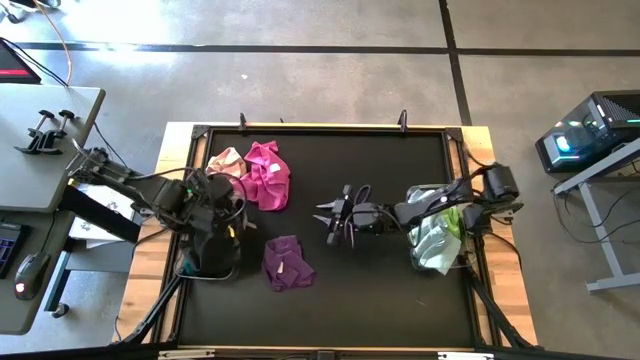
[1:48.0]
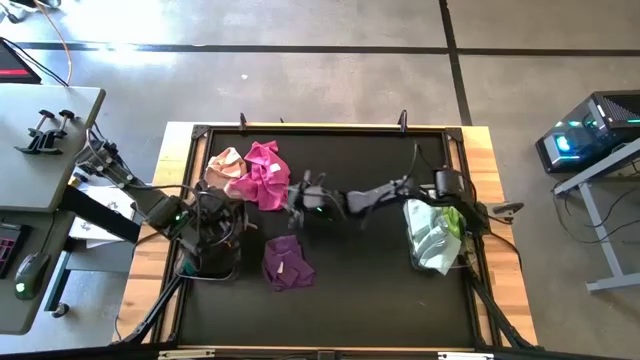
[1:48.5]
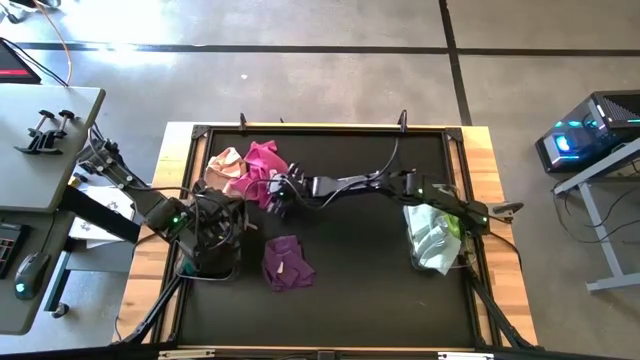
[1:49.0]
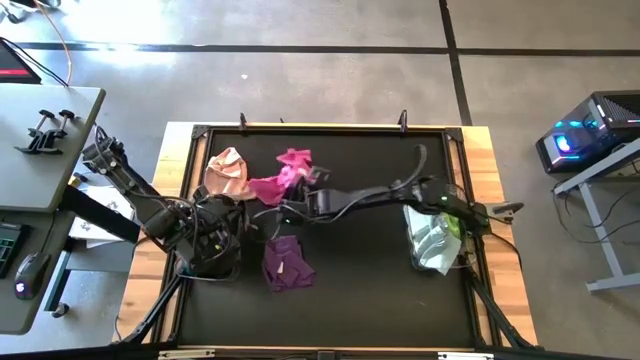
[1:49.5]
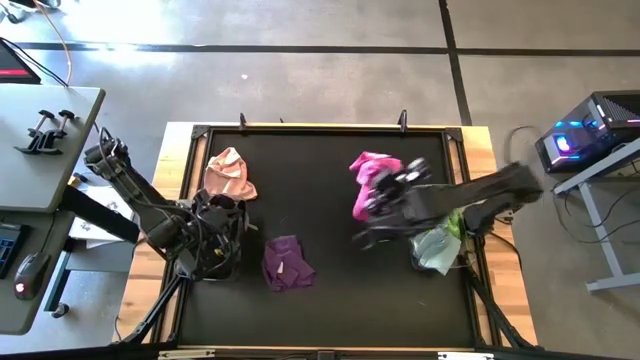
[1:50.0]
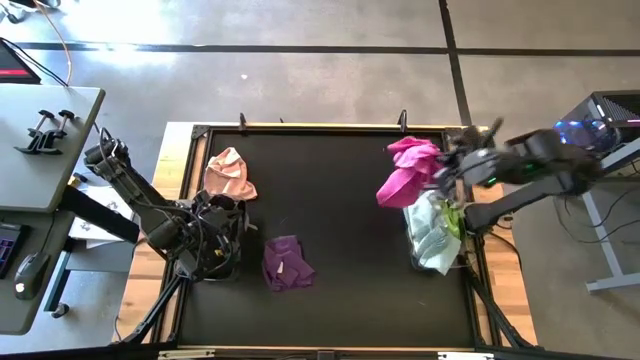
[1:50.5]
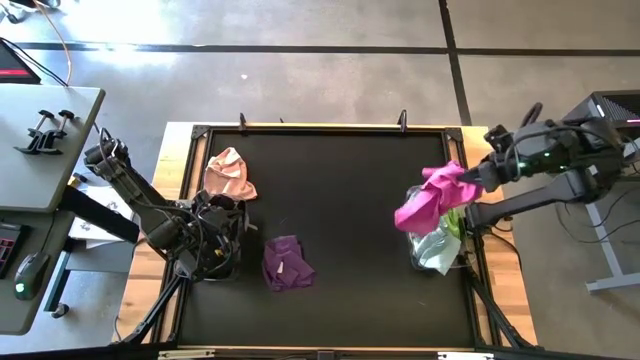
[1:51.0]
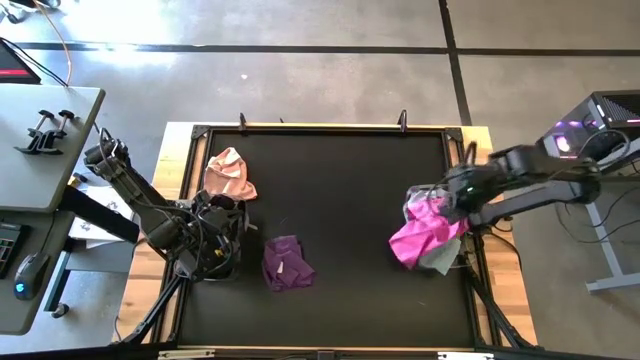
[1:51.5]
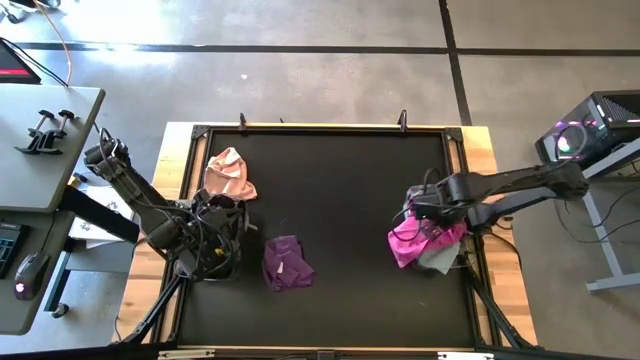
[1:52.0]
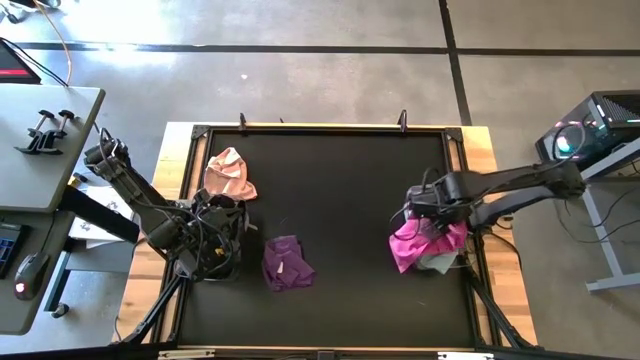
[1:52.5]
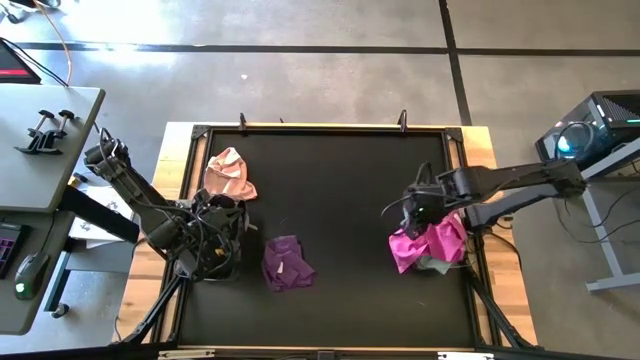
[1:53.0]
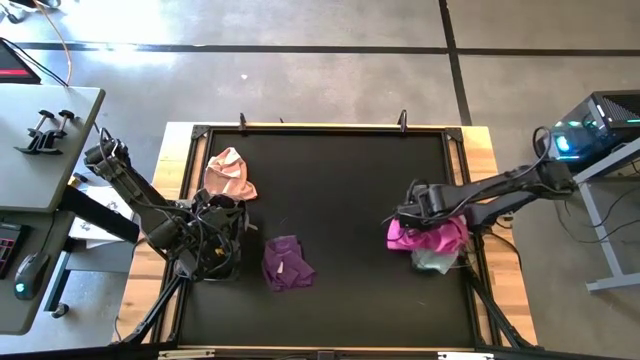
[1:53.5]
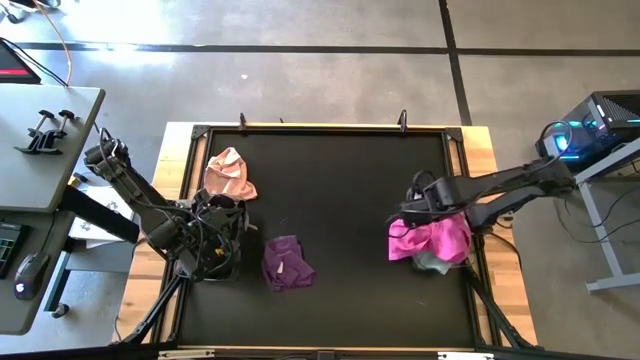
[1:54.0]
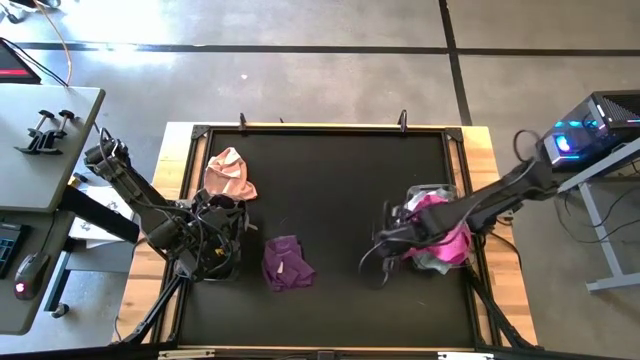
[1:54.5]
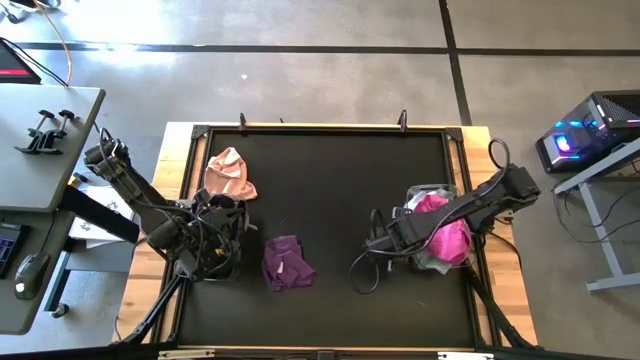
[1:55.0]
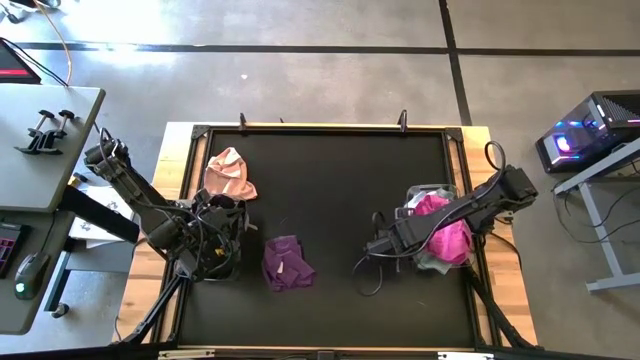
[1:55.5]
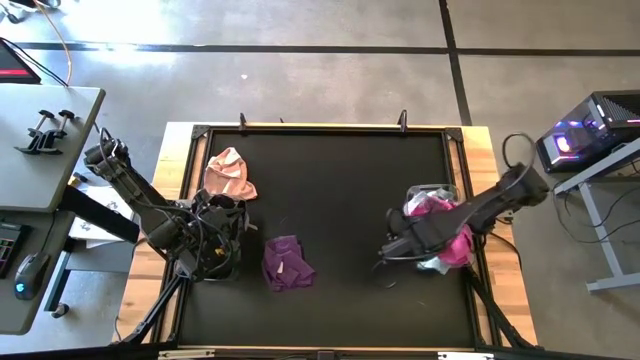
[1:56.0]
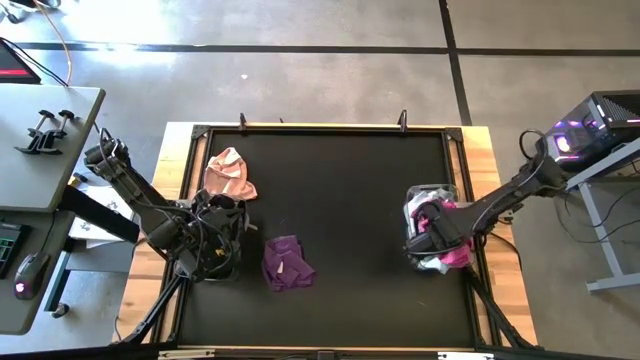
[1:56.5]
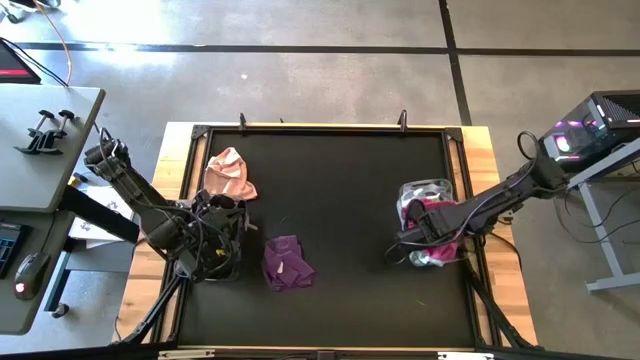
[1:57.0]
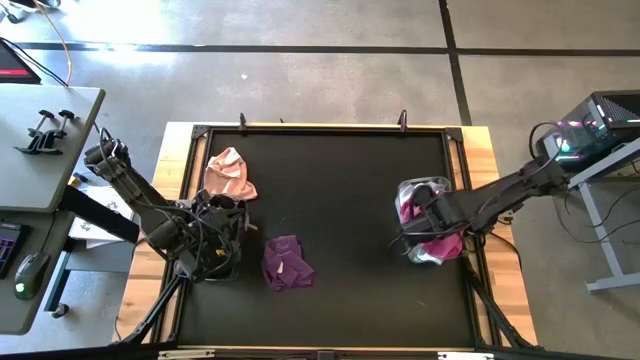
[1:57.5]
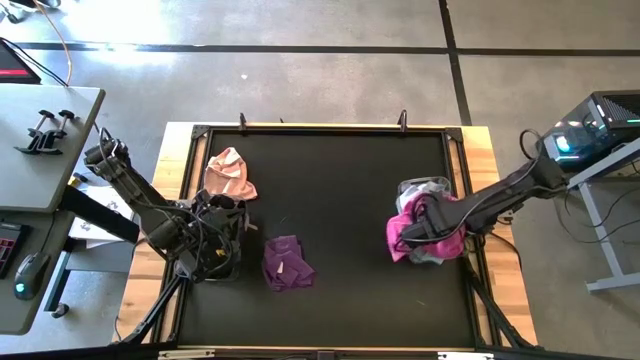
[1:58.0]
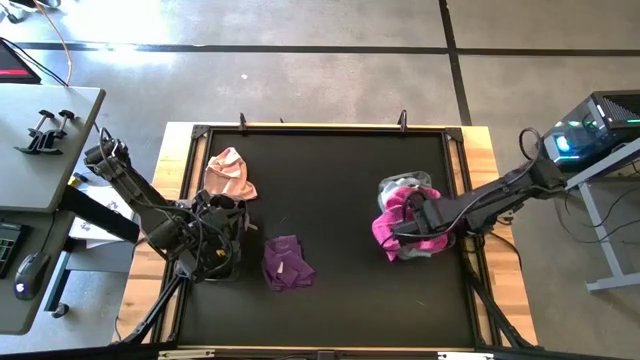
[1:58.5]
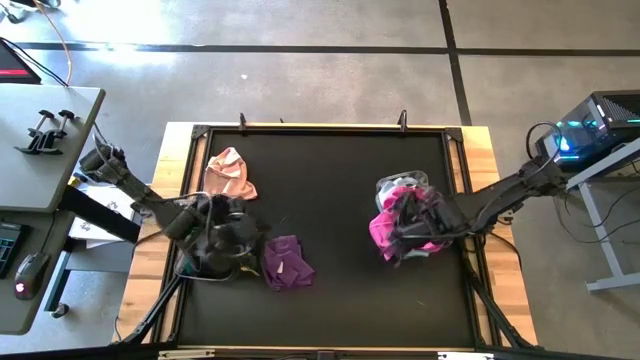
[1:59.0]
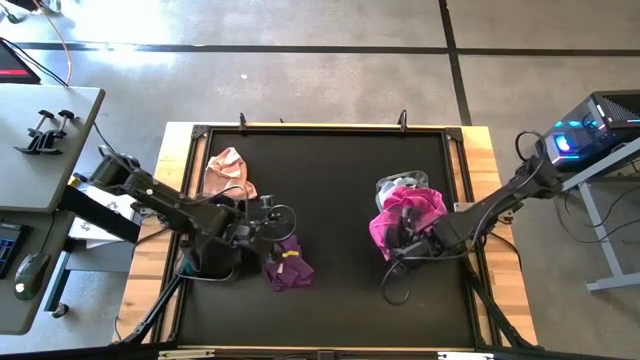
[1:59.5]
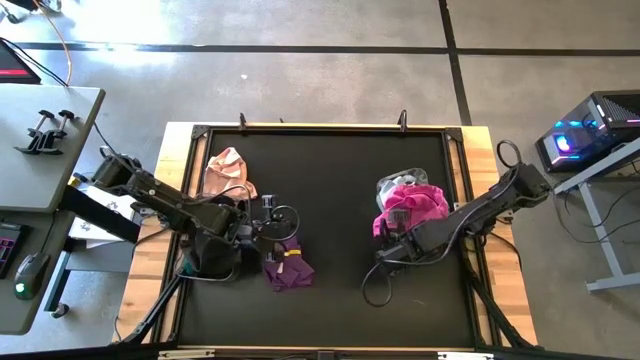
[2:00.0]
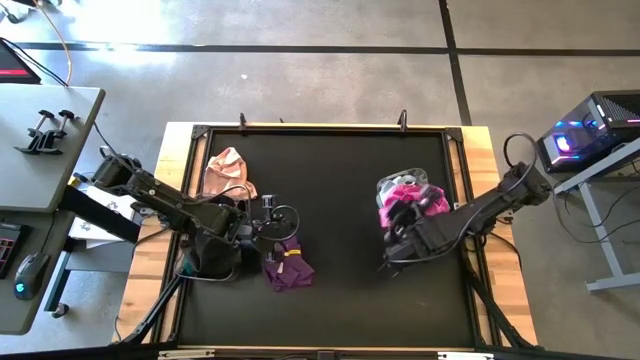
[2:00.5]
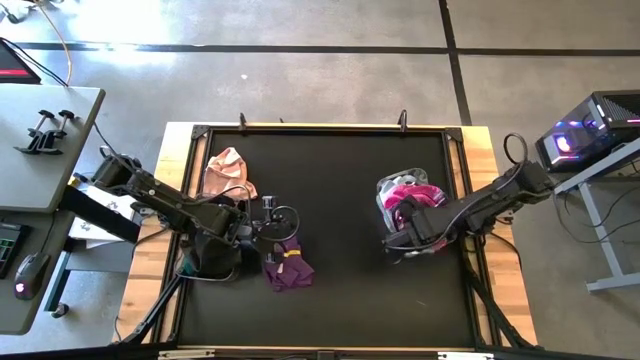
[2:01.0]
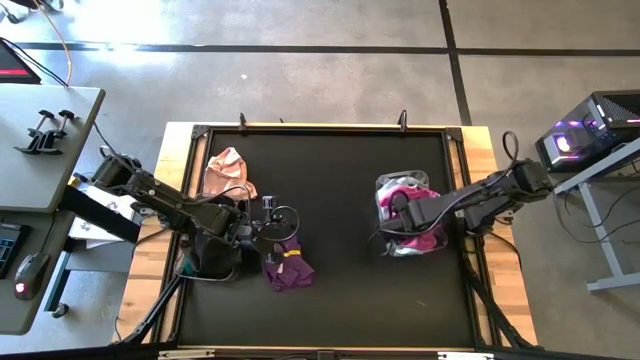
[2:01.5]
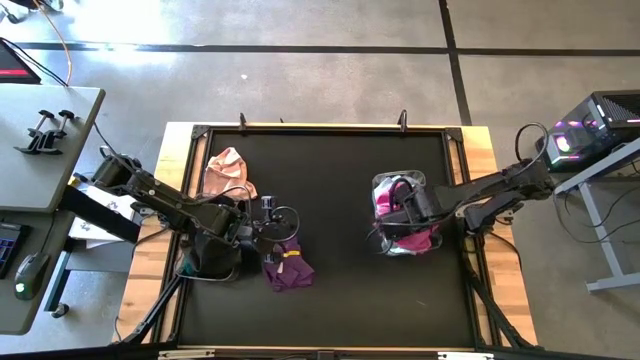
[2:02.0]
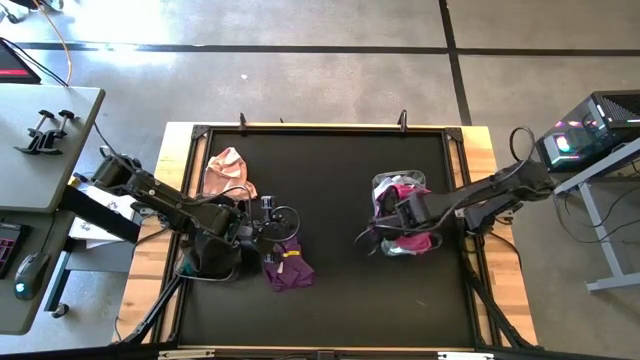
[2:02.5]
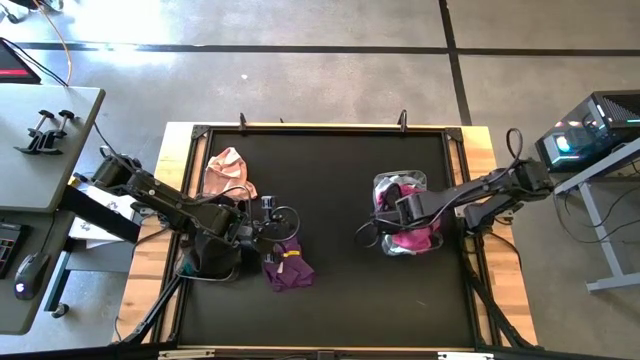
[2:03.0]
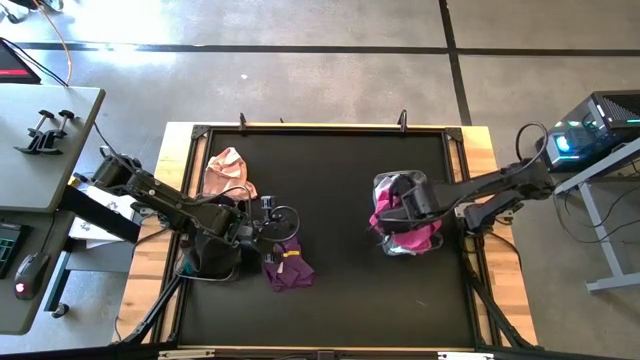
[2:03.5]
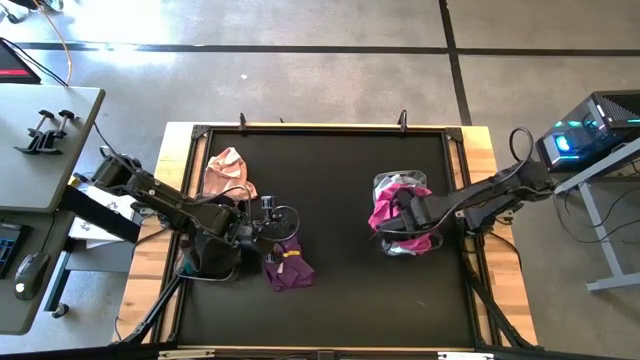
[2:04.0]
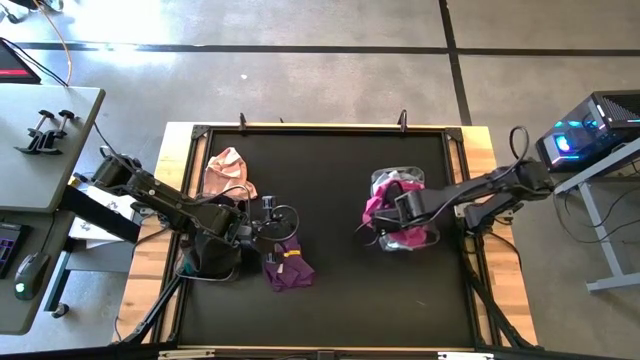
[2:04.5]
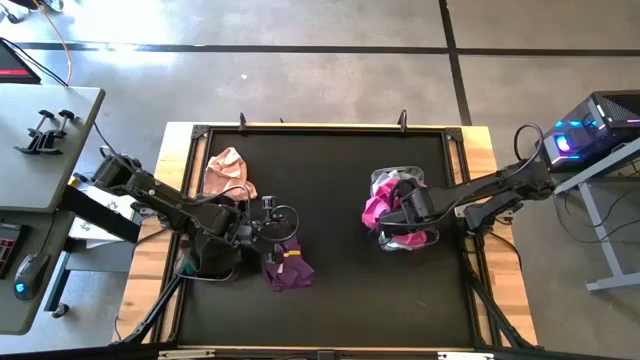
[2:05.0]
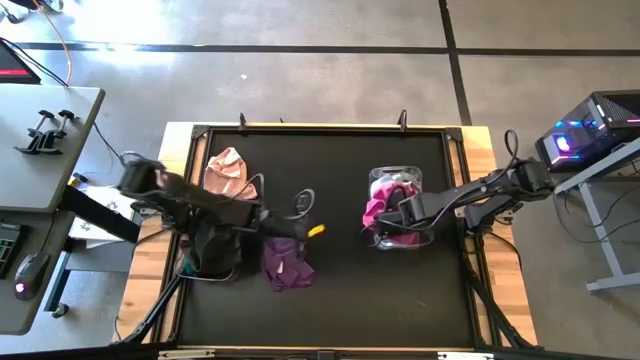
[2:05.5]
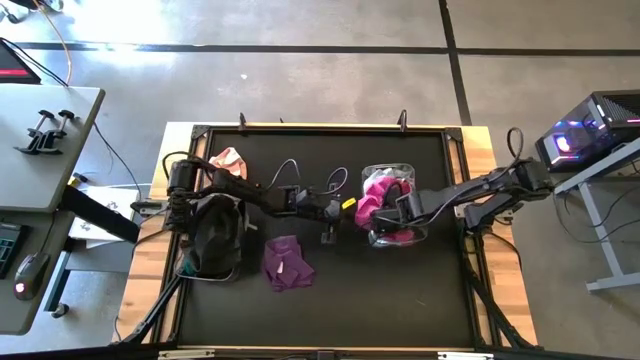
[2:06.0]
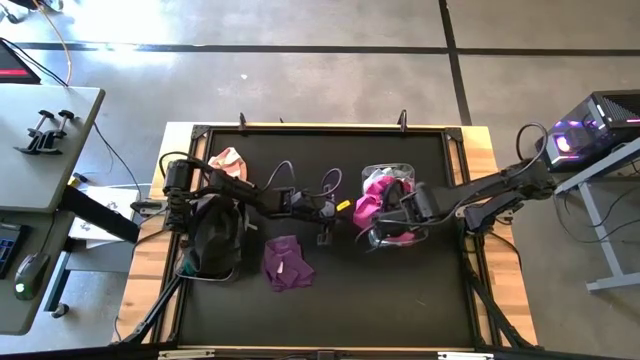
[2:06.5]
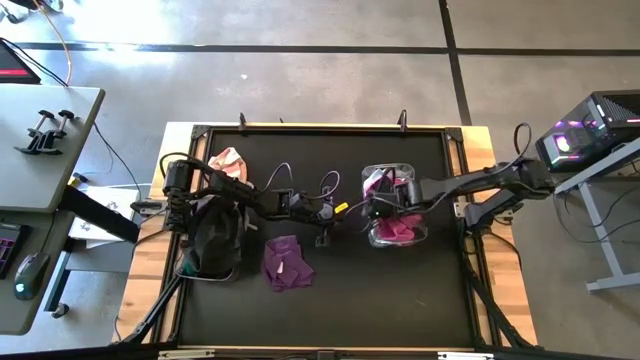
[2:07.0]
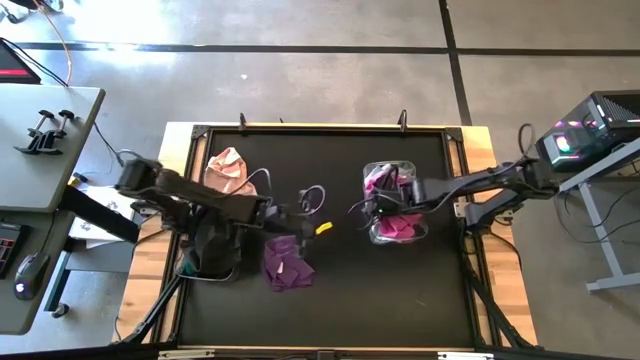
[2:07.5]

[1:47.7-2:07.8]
Task: Sort towels by color in basket
Put the pink towel into the right transparent bin

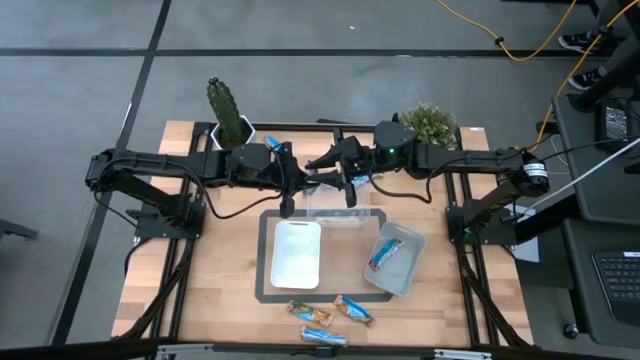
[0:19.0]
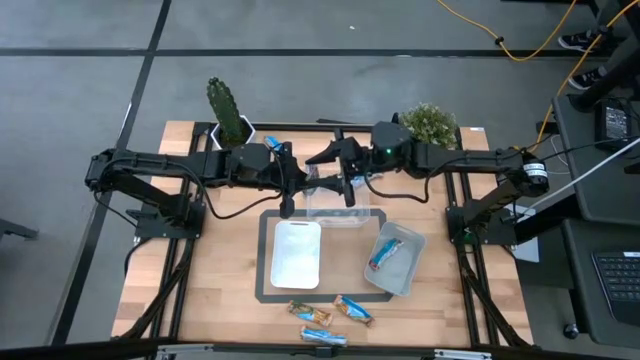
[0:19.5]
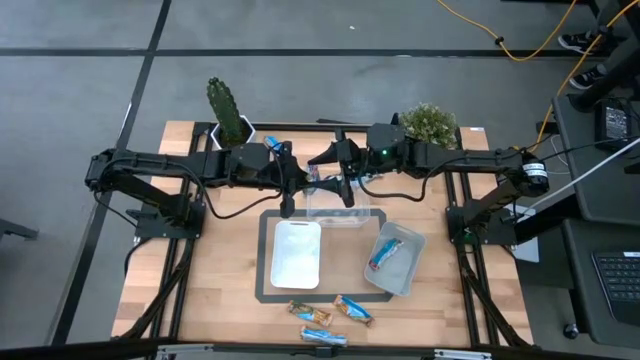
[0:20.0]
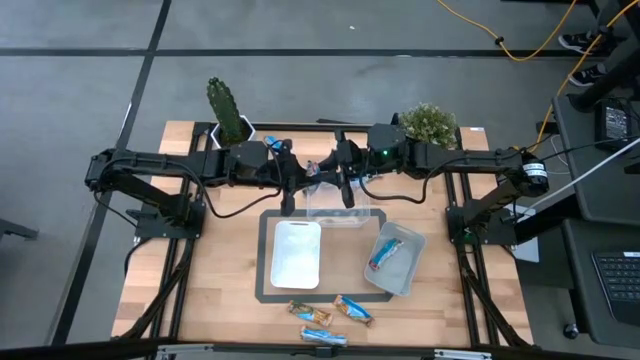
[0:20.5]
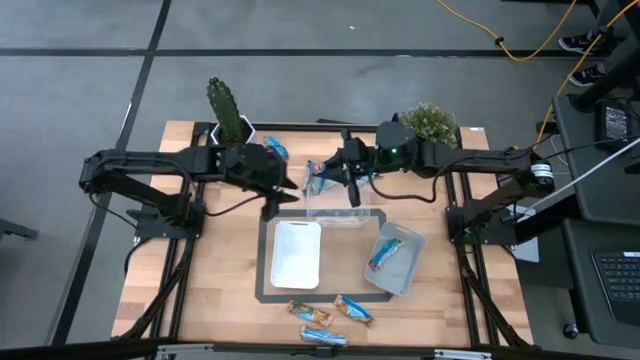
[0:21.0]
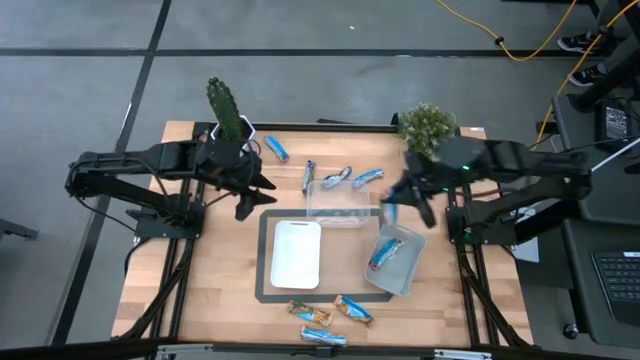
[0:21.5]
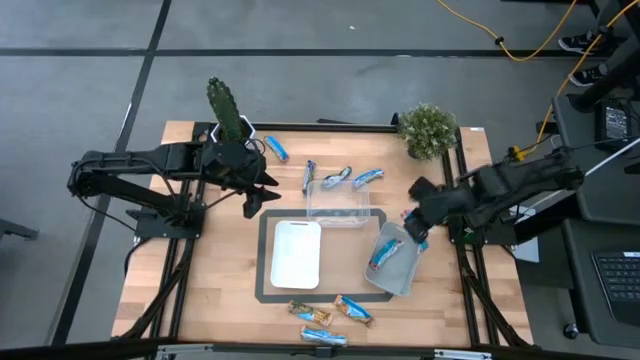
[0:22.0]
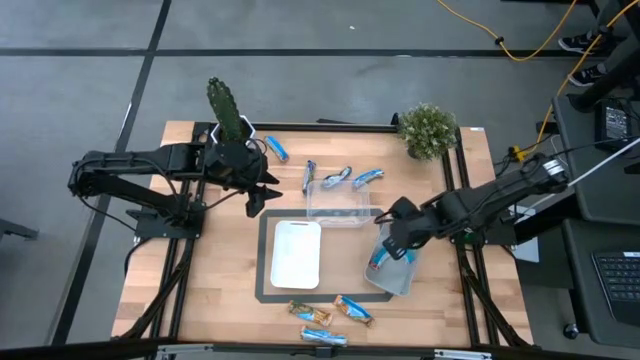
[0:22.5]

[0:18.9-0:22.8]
Task: Pick and place Granola Bars by type
Put the red granola bar into the gray bin
